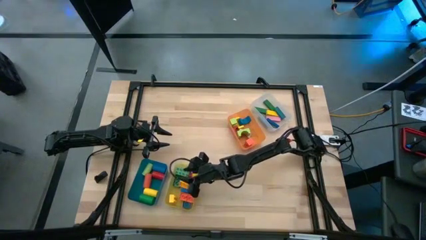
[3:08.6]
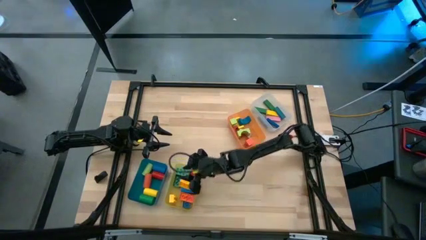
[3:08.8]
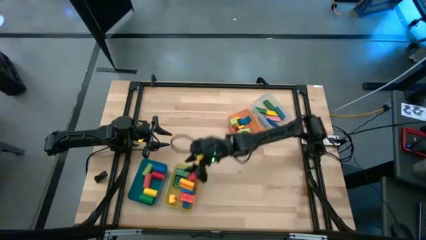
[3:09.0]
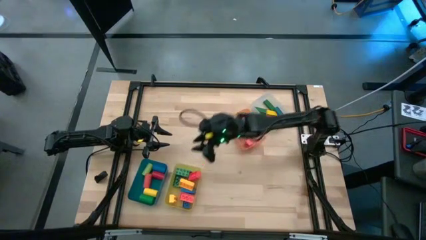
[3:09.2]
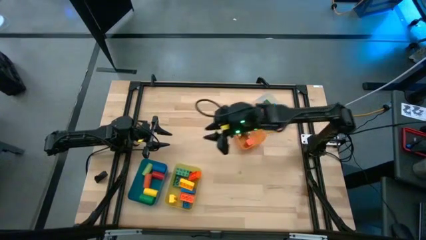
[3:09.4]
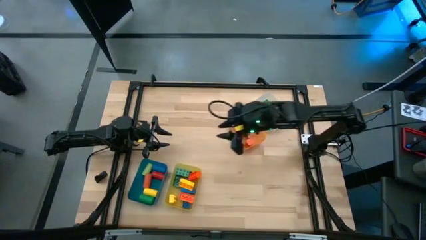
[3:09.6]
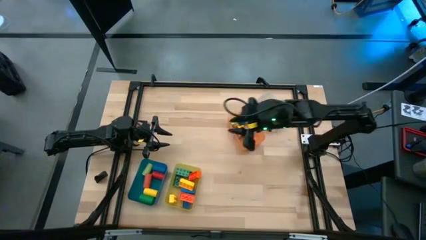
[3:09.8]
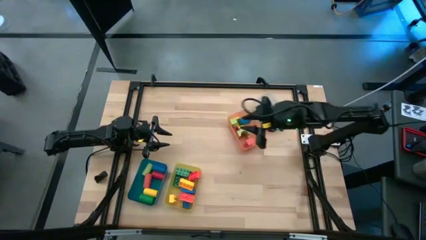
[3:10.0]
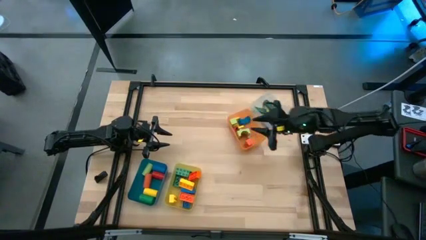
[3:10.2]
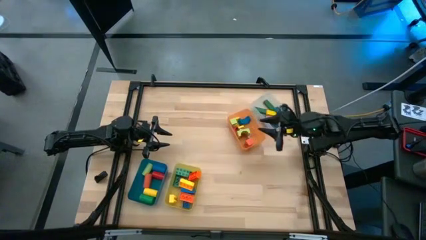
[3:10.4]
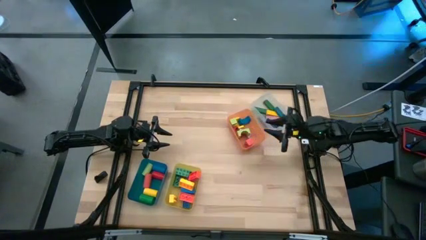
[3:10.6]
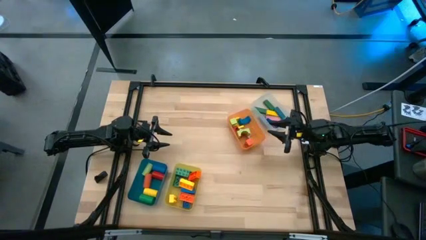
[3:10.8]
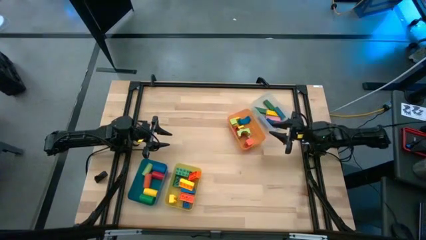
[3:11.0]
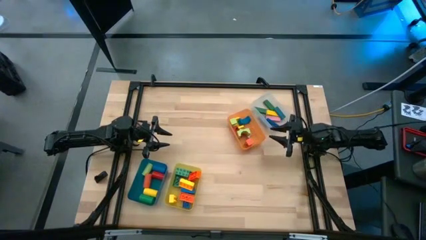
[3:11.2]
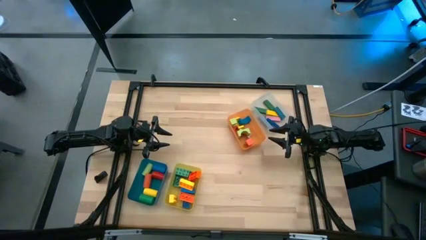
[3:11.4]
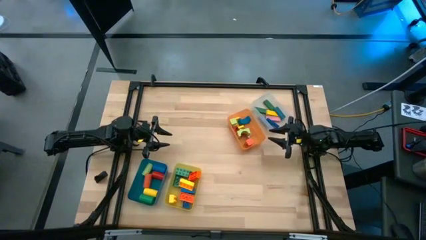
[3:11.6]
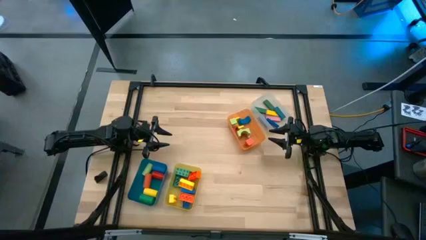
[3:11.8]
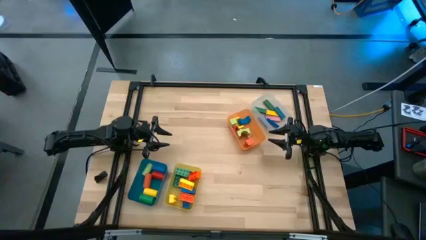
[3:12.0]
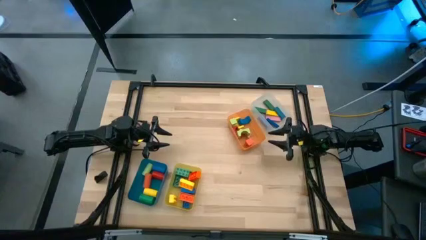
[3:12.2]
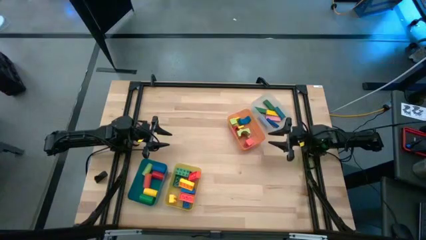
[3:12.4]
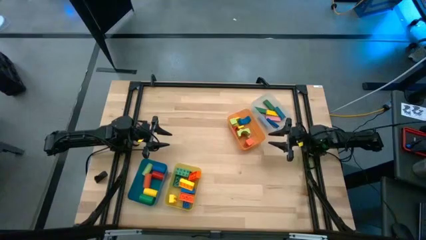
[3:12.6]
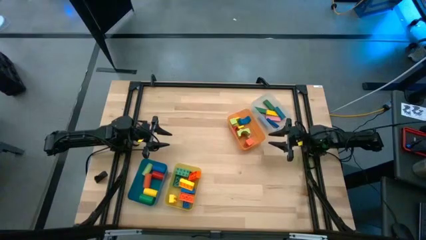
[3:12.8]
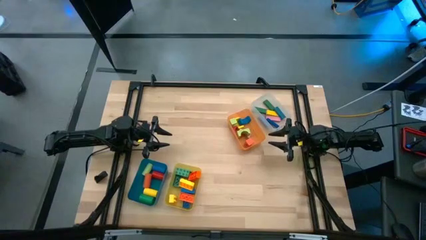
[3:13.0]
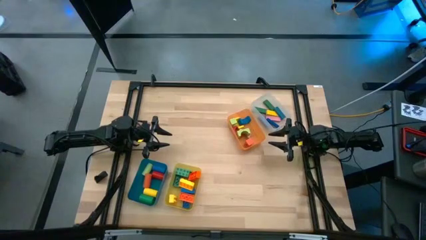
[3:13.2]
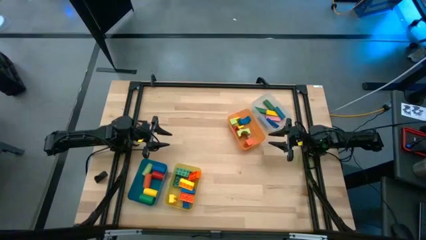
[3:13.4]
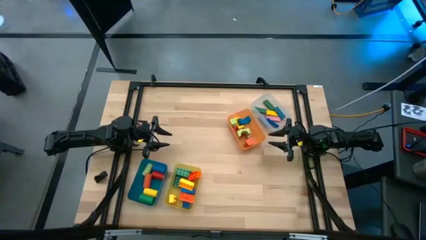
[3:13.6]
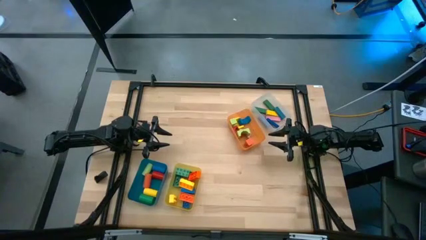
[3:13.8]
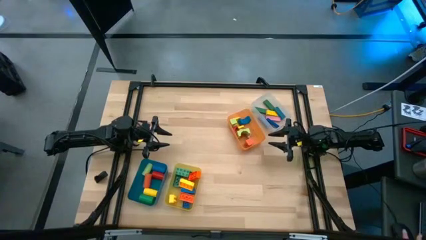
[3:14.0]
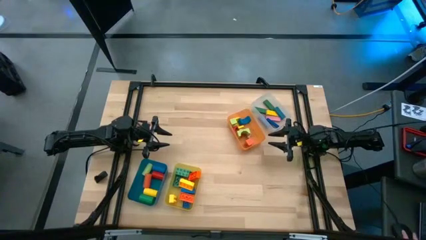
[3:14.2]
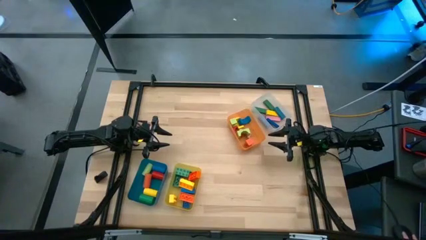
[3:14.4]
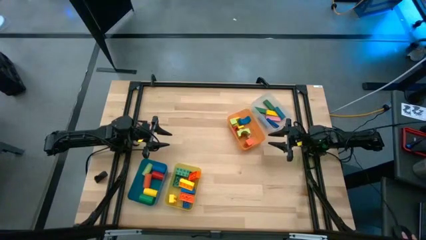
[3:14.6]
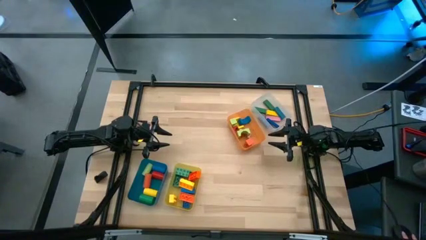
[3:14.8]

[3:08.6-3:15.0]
Task: Sort blocks by size
Return to Home Position

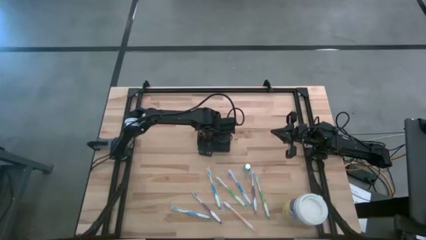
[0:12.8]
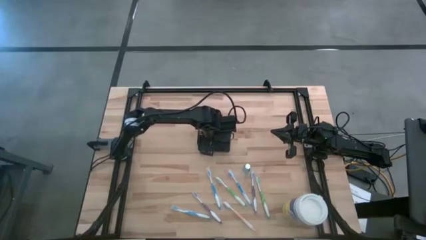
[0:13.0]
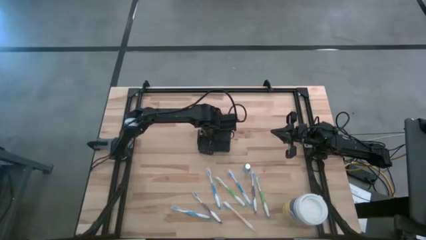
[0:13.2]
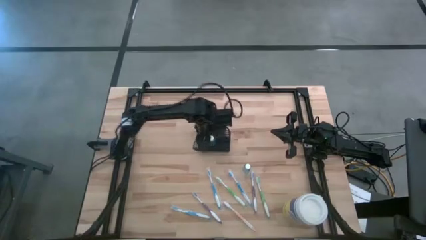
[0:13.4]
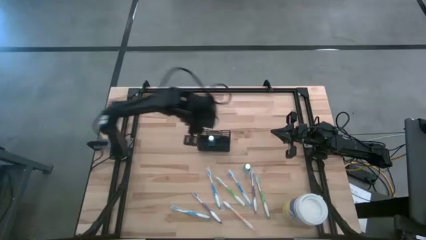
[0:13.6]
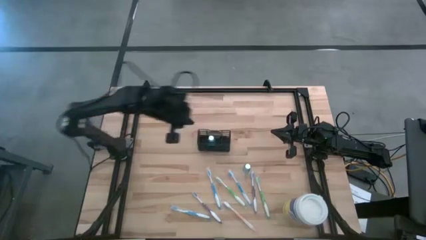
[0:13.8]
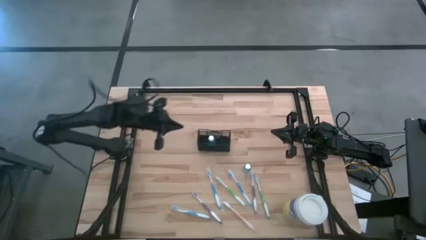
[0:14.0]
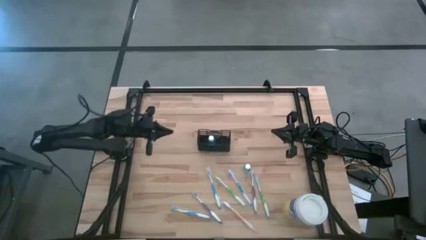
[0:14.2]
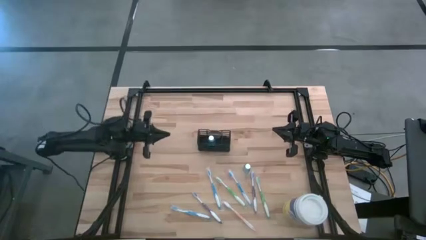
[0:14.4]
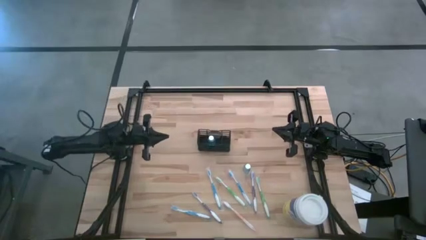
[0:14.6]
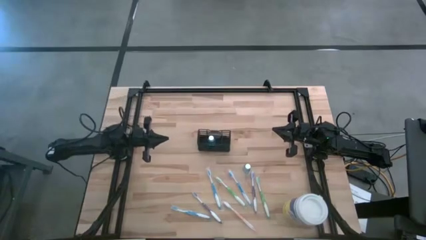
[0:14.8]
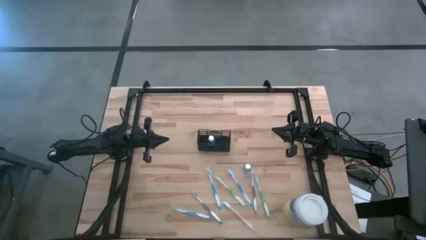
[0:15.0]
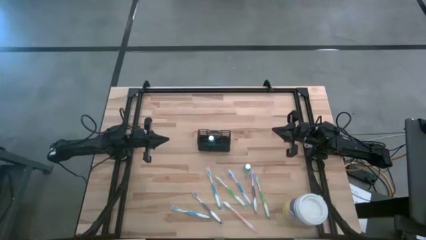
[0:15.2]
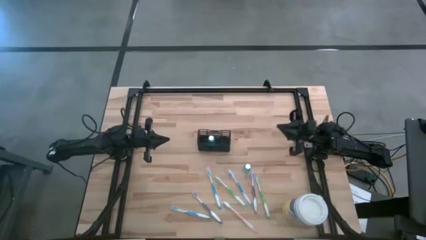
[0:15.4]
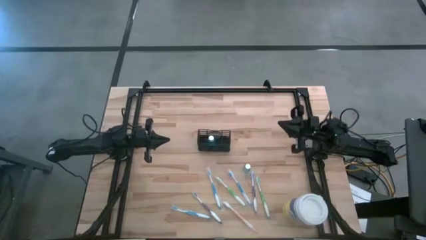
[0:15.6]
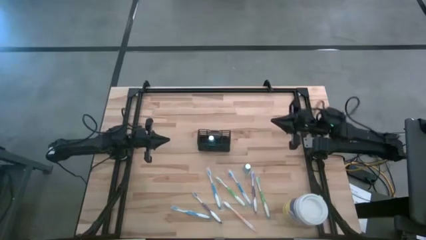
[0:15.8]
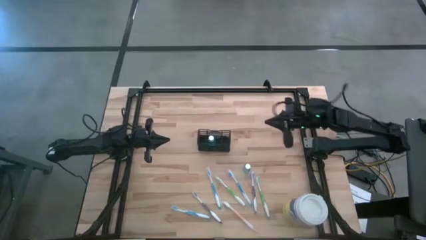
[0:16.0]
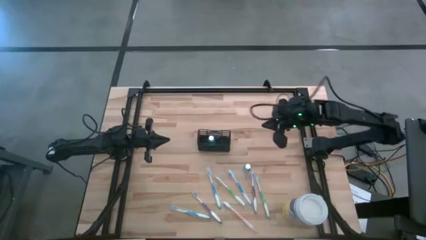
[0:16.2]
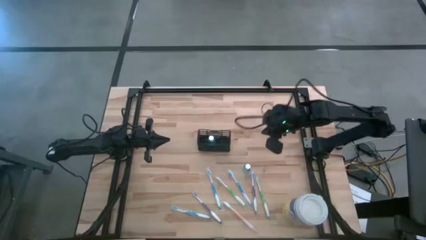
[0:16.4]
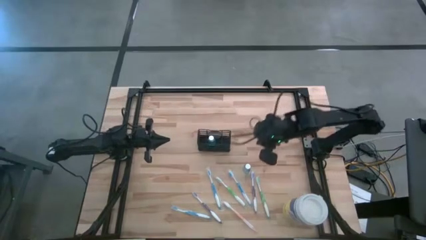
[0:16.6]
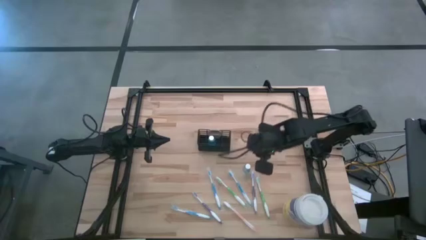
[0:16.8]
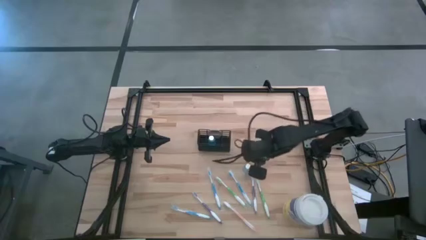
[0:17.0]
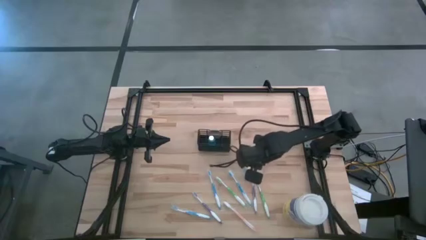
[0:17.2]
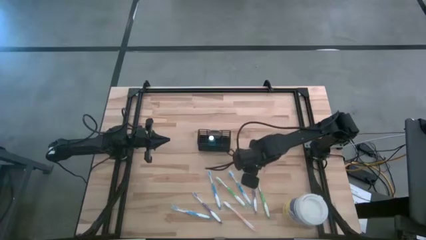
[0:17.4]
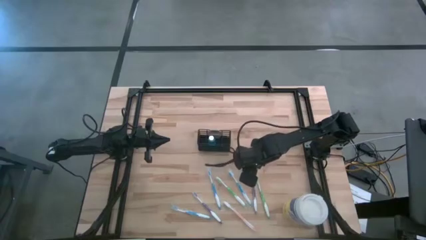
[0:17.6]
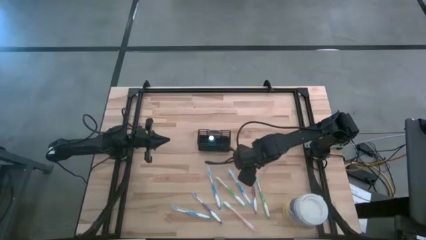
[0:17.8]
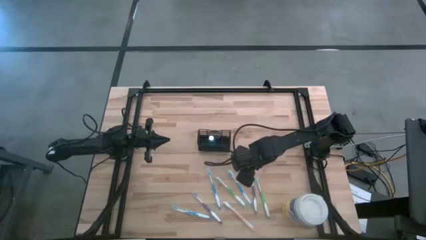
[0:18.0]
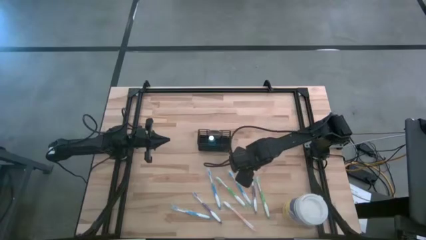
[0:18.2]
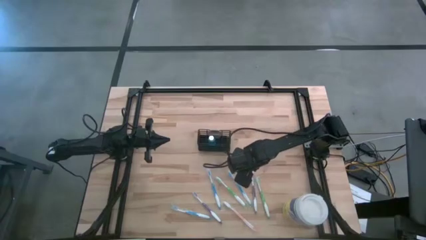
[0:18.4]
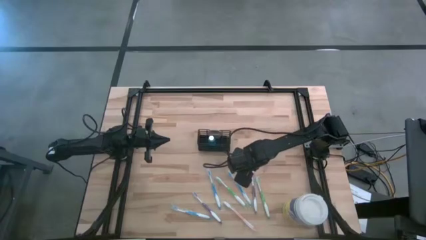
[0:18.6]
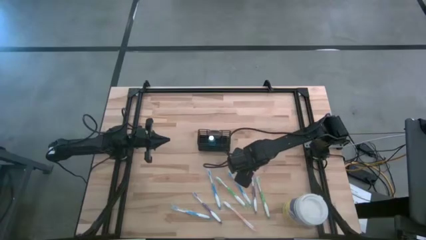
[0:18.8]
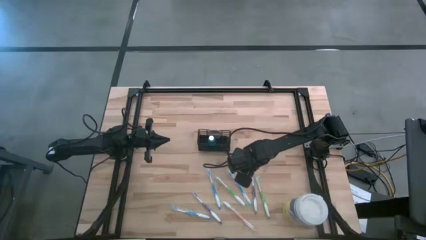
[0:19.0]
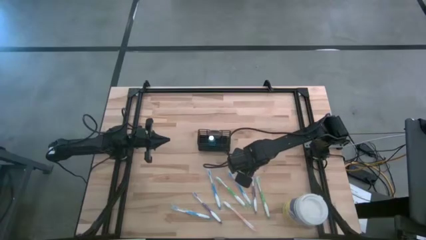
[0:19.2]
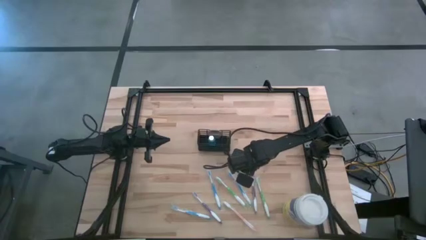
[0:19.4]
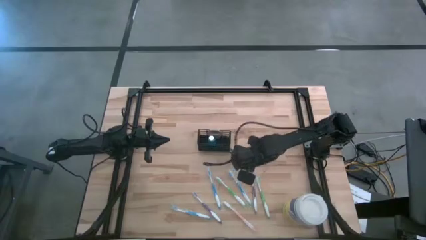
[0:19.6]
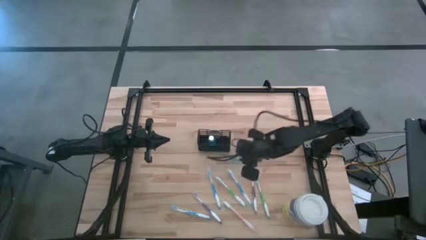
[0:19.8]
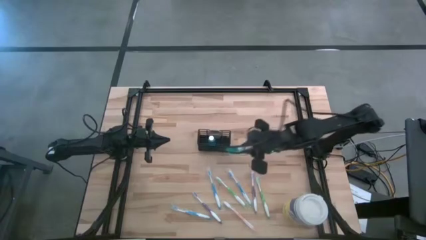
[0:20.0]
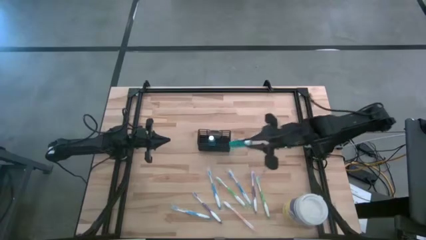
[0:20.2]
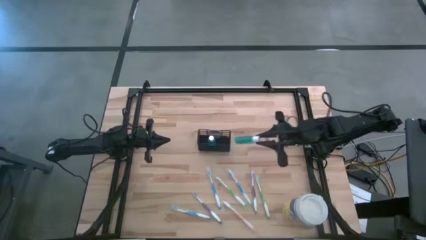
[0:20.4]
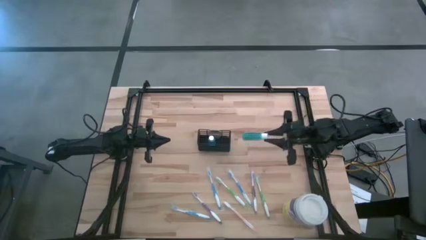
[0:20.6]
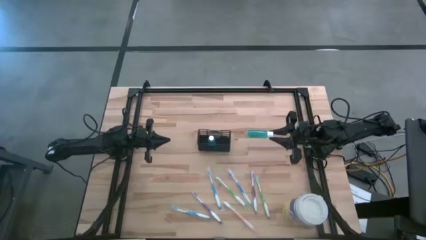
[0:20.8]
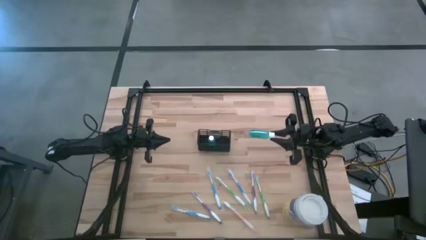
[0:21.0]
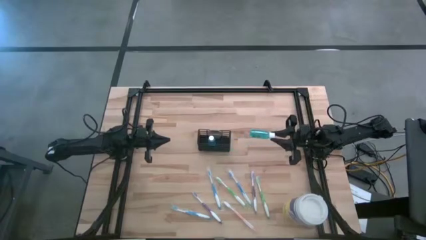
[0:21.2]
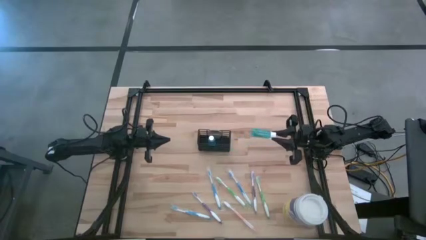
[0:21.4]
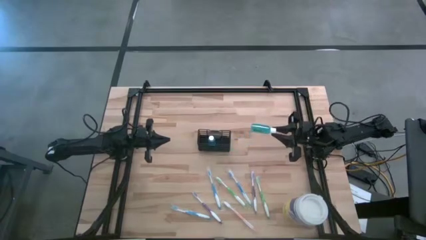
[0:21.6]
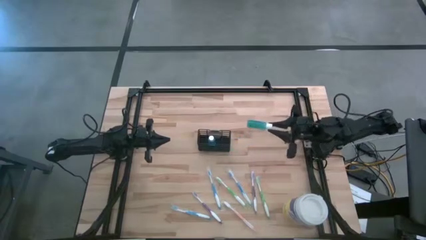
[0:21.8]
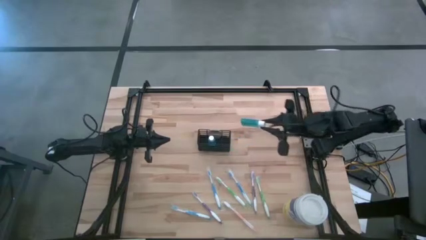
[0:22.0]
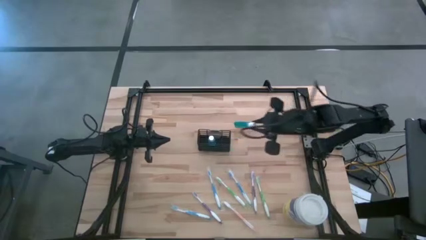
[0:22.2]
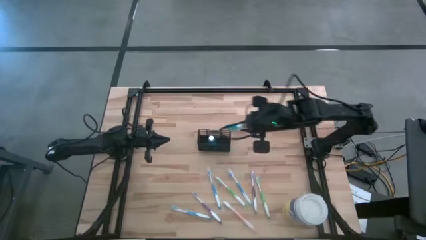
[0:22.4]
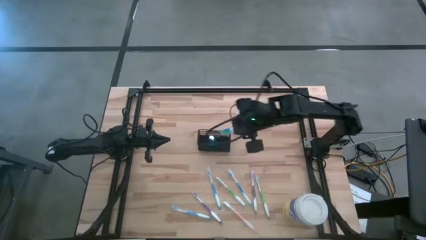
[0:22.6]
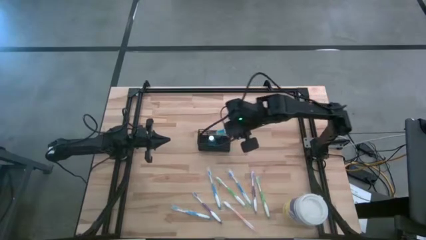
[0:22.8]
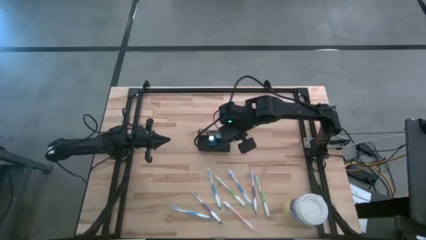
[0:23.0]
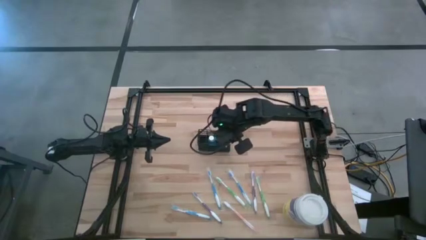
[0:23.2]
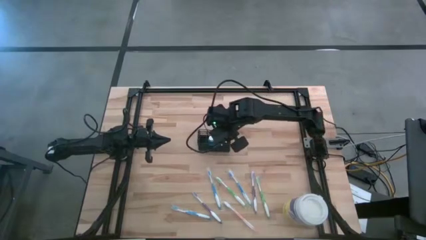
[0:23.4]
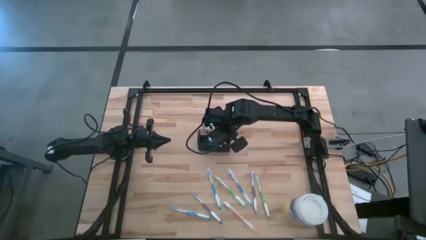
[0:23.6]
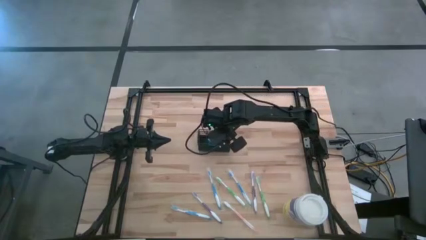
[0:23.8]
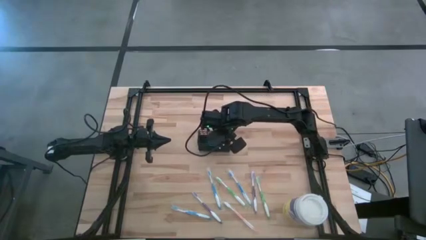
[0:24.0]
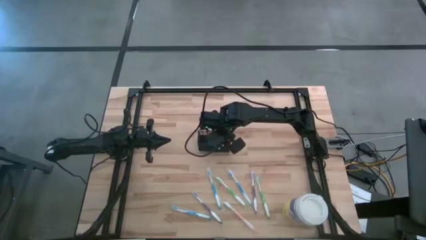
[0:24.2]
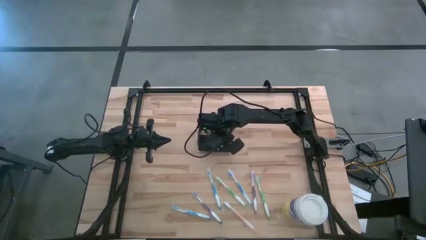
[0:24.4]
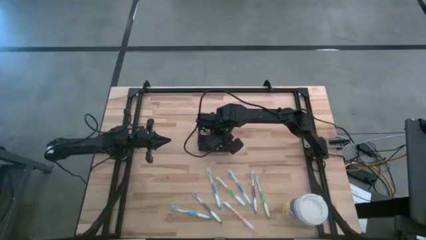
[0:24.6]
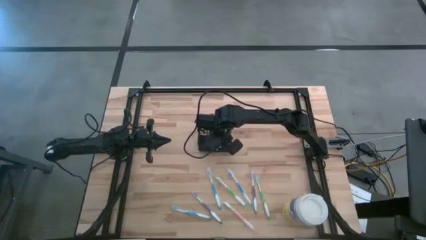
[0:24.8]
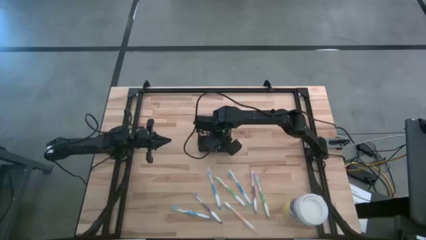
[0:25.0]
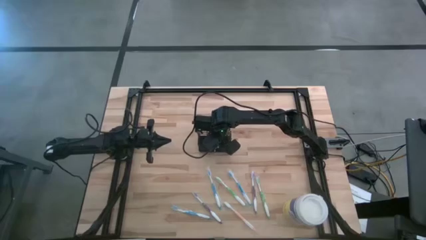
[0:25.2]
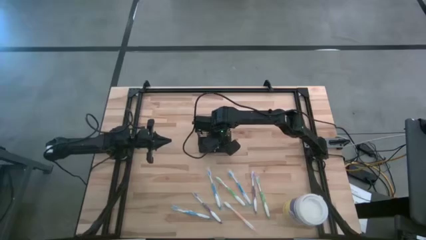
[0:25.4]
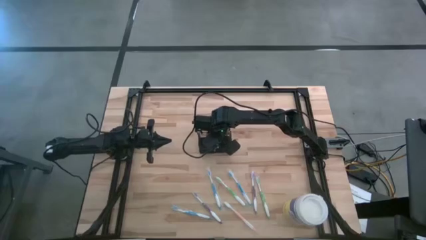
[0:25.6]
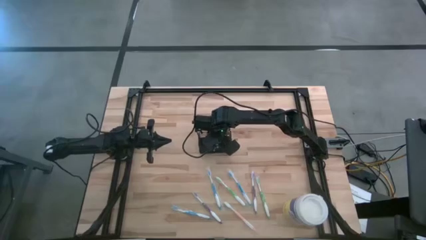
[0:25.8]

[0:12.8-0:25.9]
Task: Pick & Place toothbrushing station
Put the blue mouthwash into the black wire organizer
